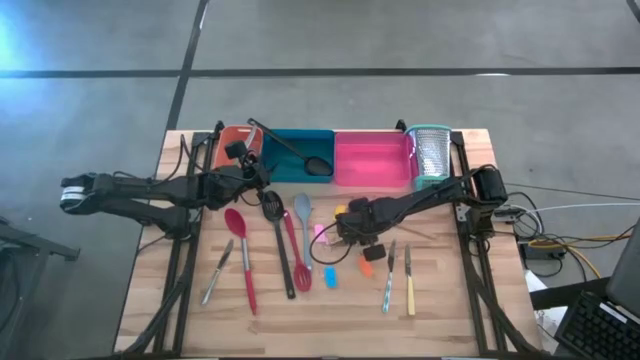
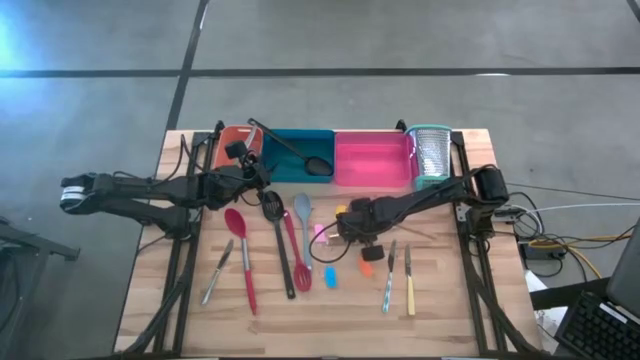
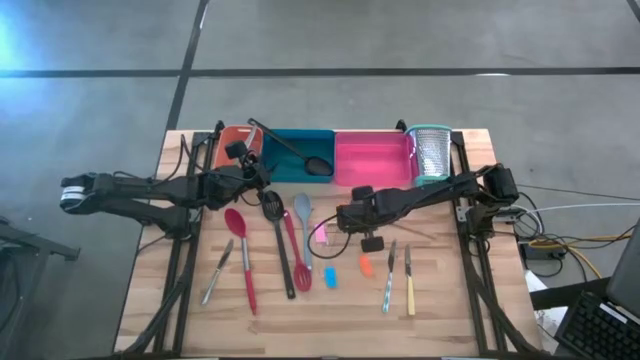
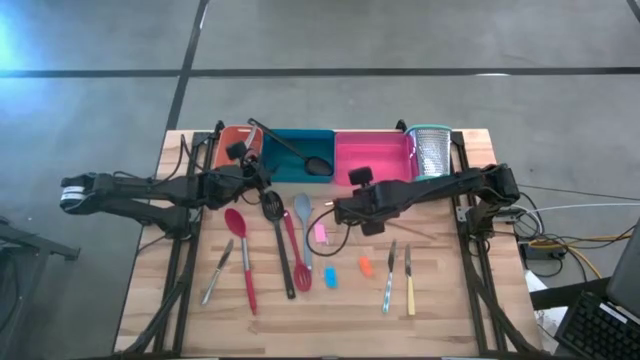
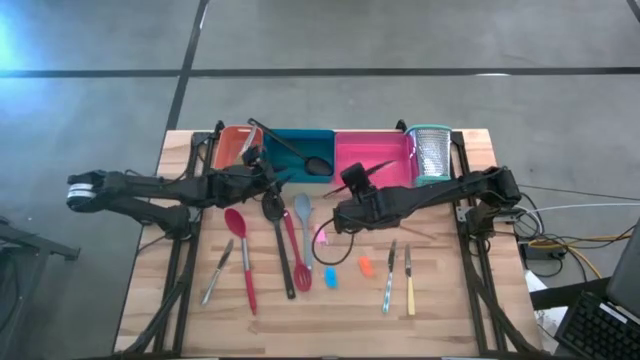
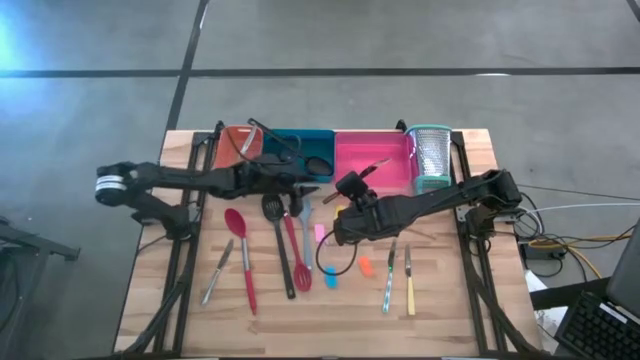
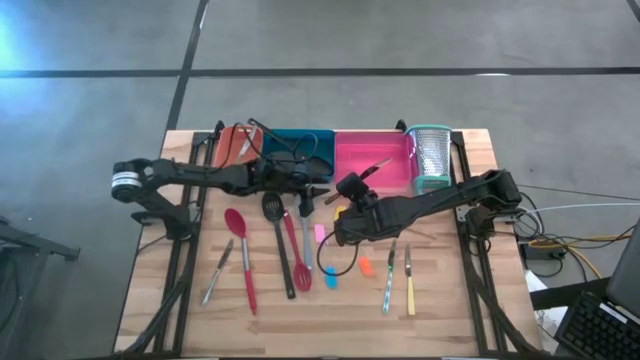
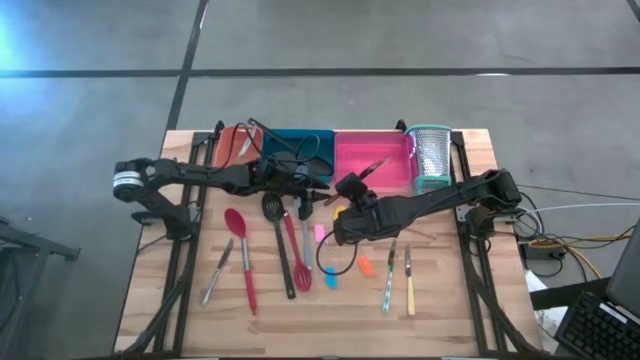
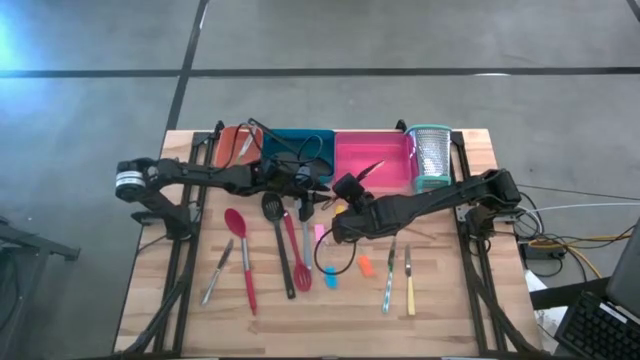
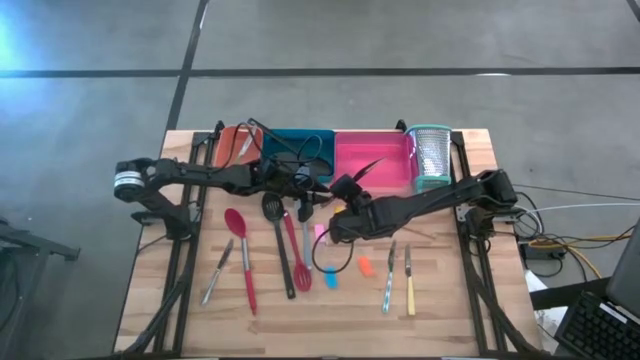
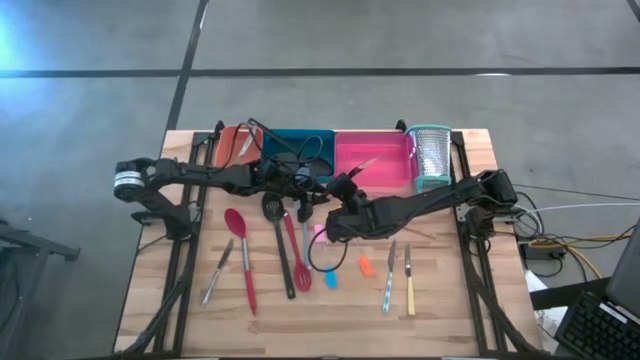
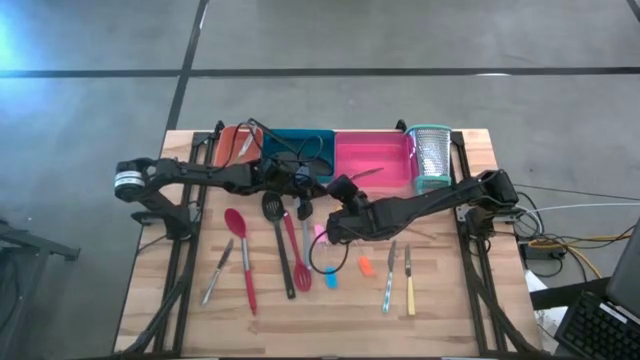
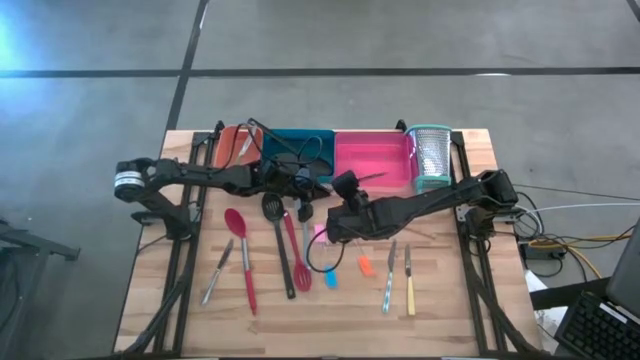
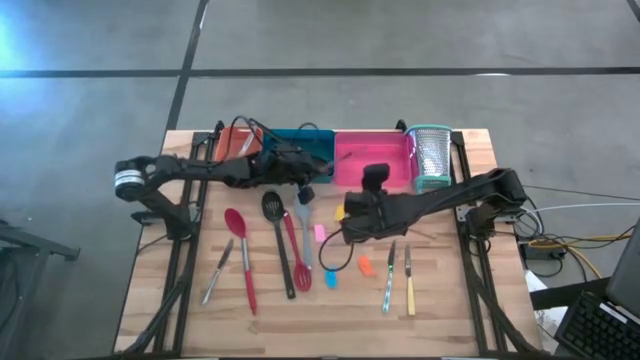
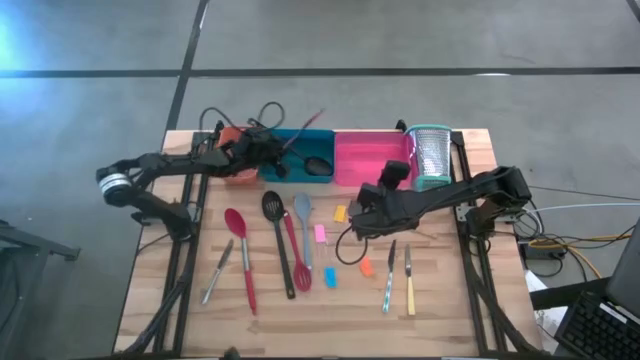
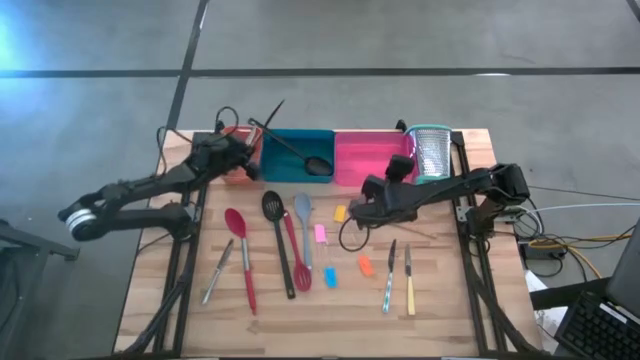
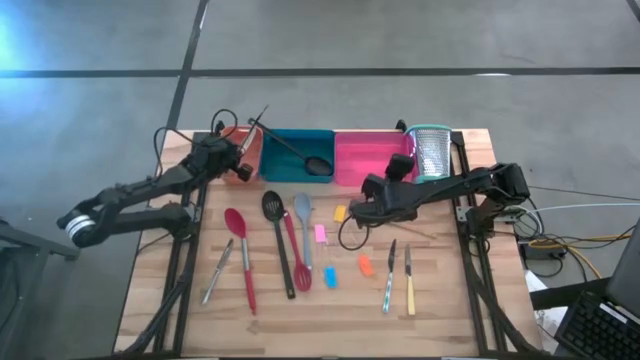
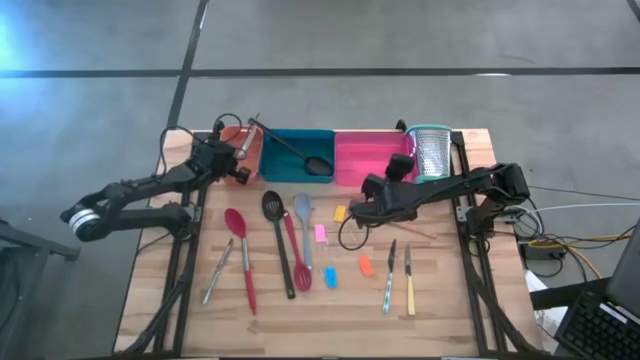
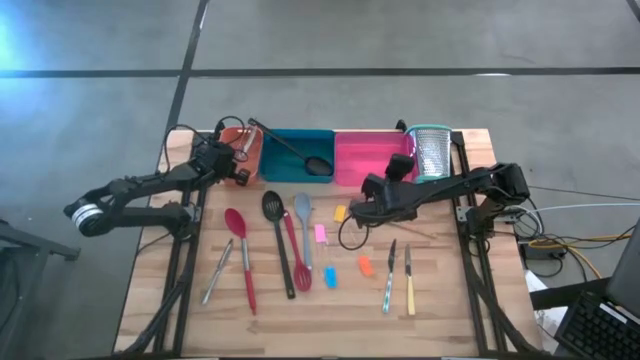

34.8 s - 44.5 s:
Task: Pick & Place Kitchen Items
Put the gold knife into the orange bin

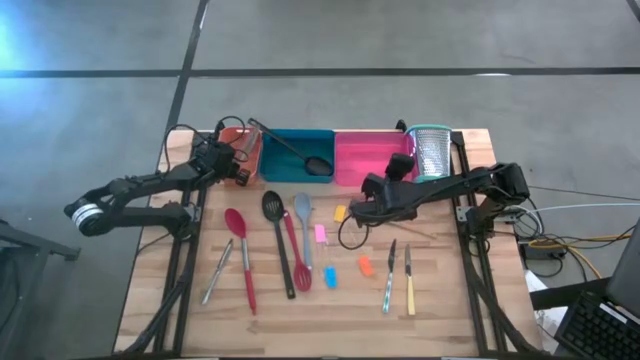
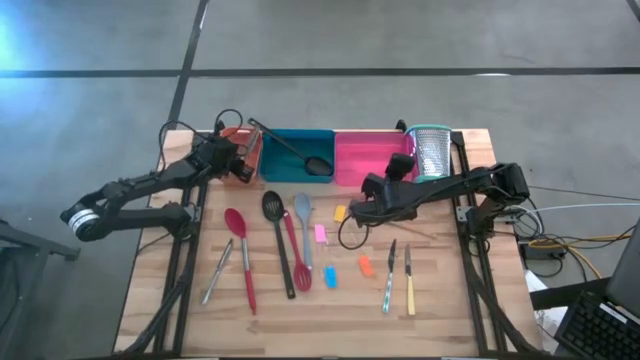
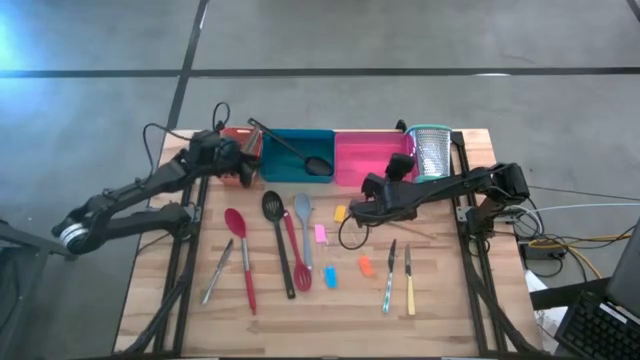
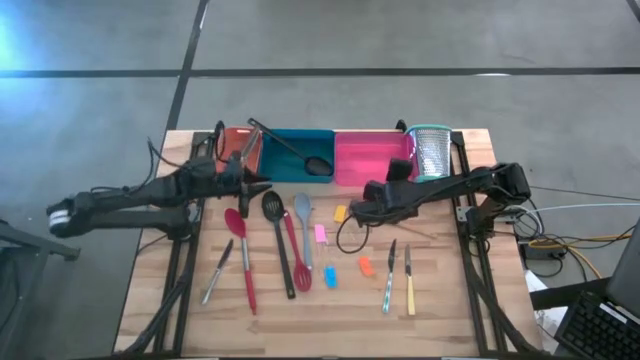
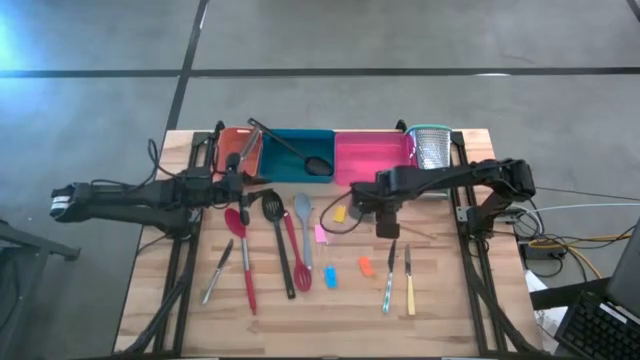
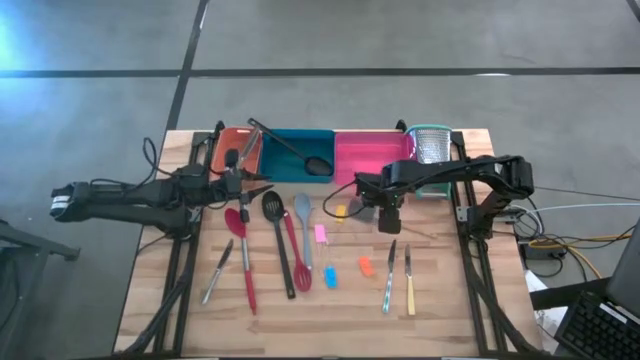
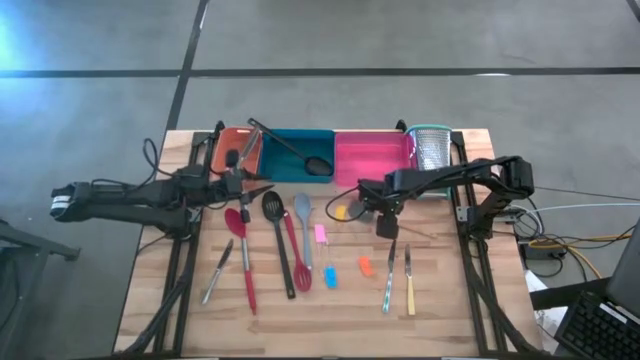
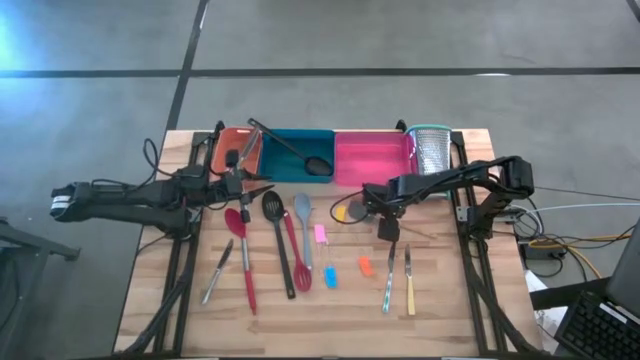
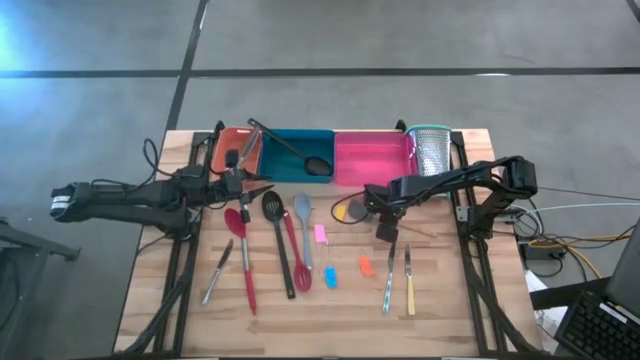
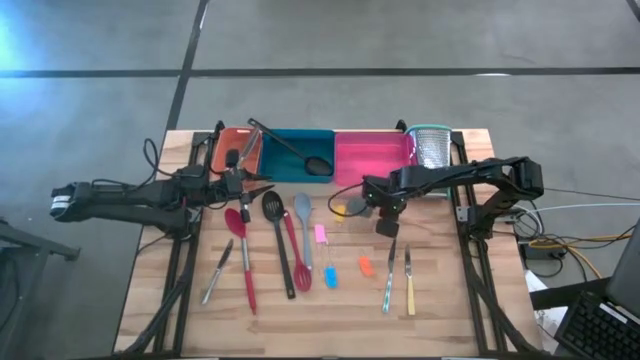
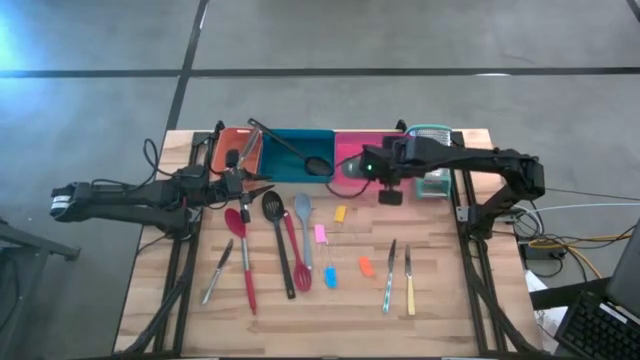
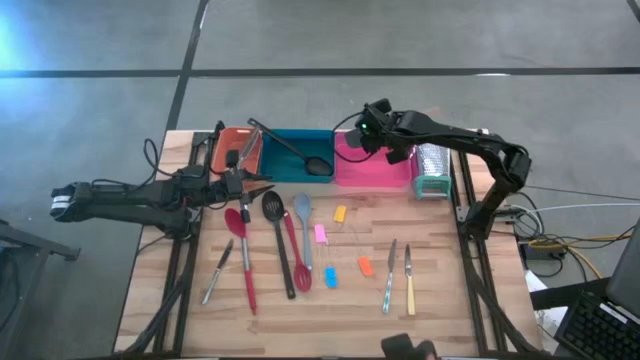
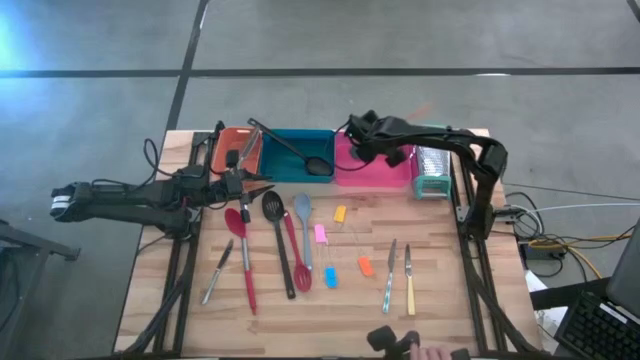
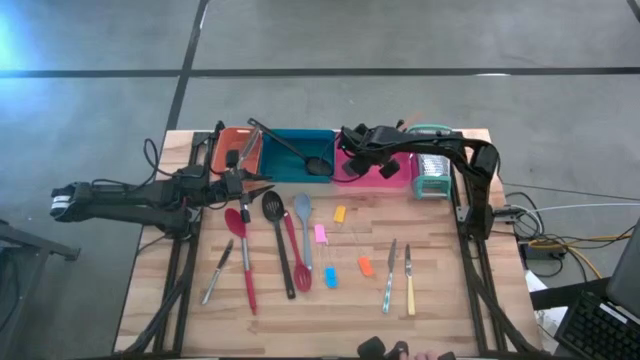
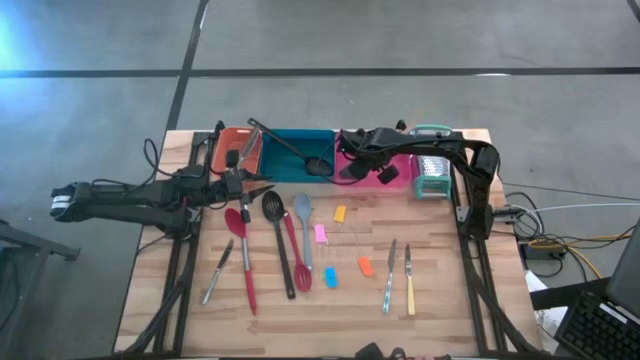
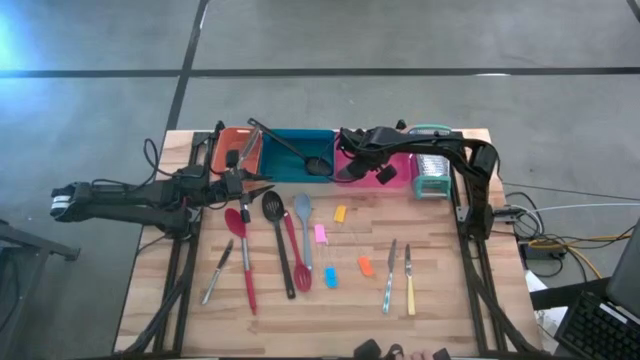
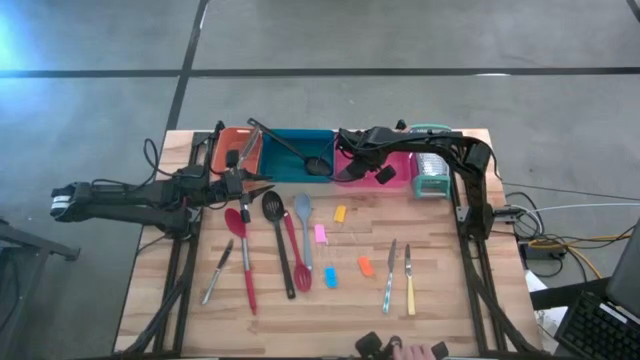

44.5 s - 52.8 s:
Put the gray spatula into the red bin

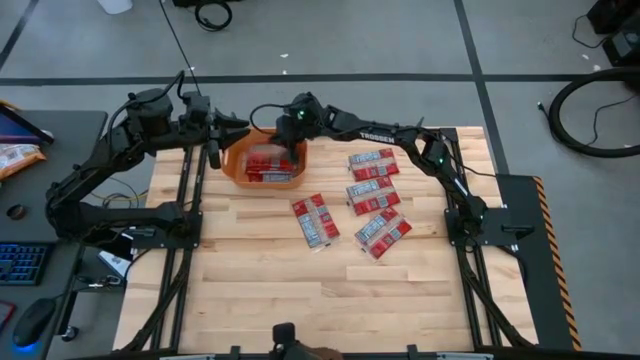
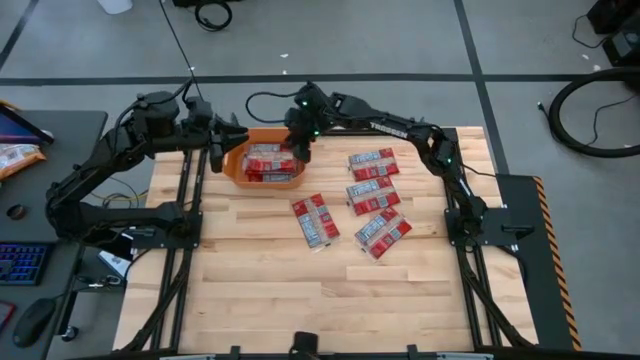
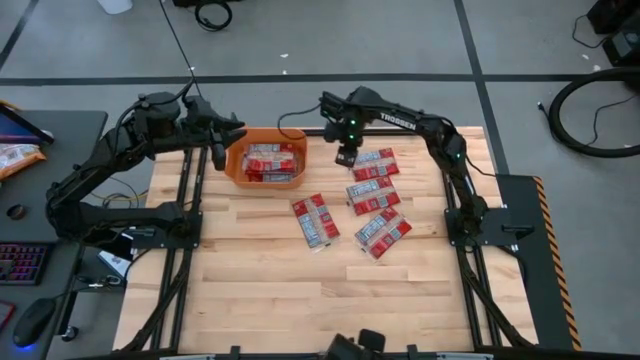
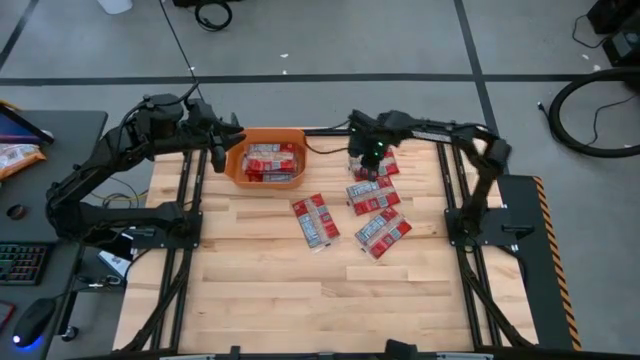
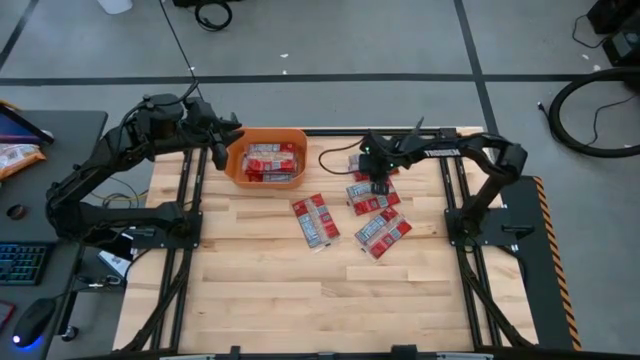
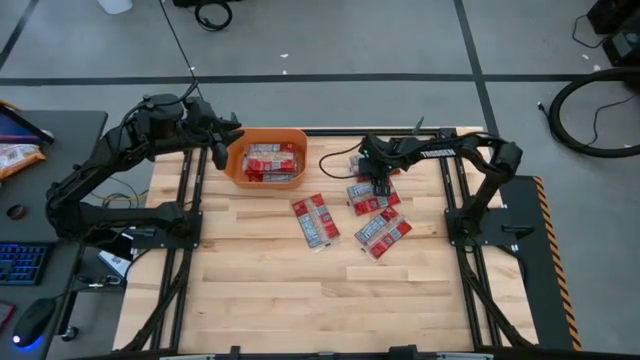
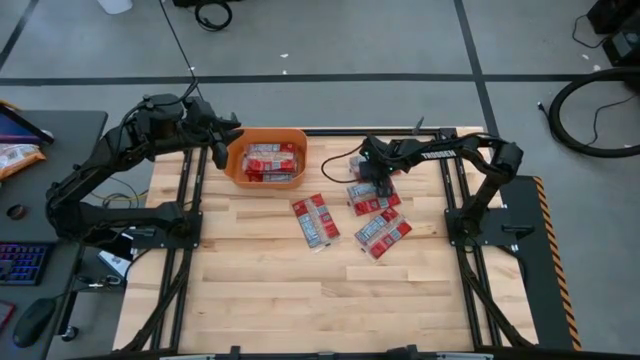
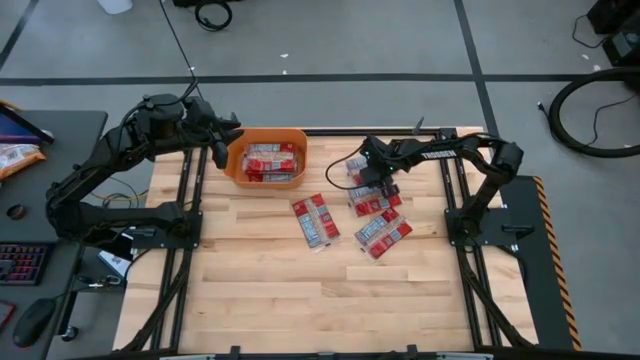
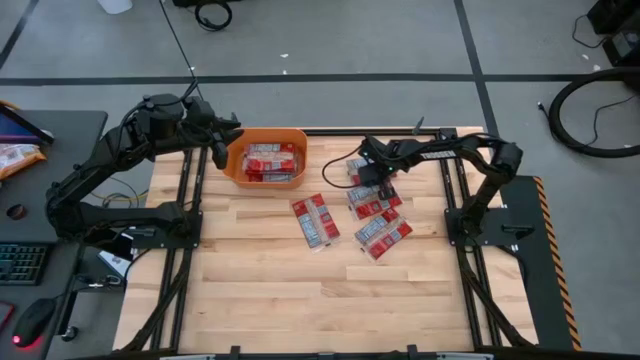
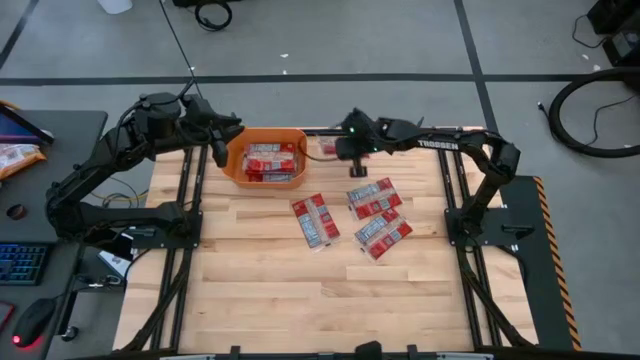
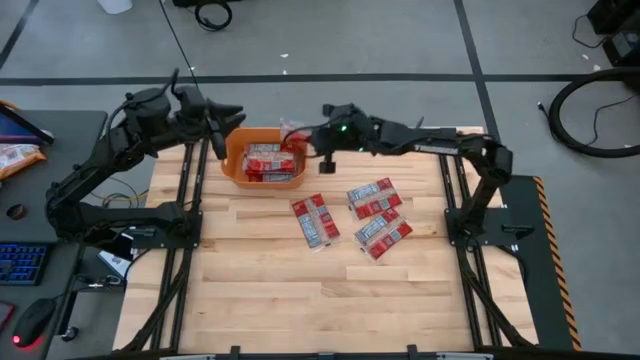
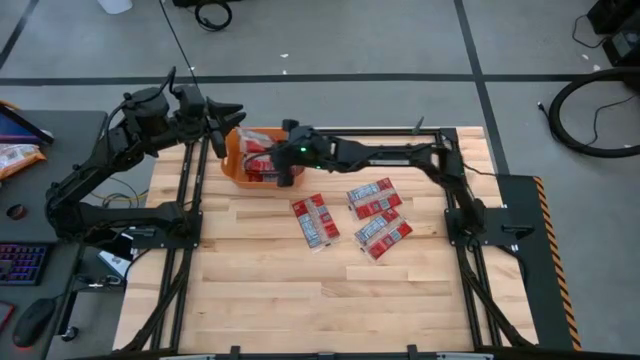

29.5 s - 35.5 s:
Task: Sort popcorn bags into baskets
Put the red popcorn bag into the orange container
